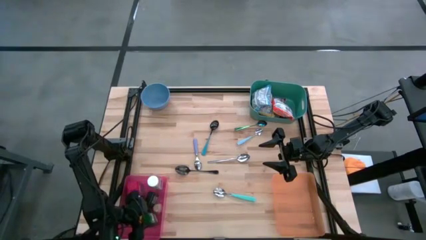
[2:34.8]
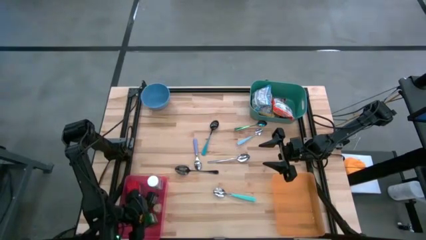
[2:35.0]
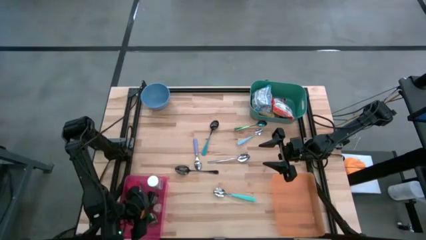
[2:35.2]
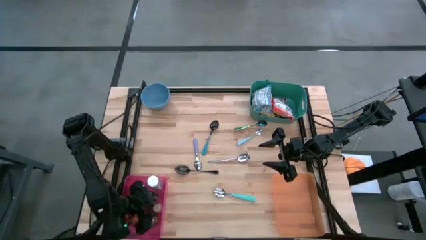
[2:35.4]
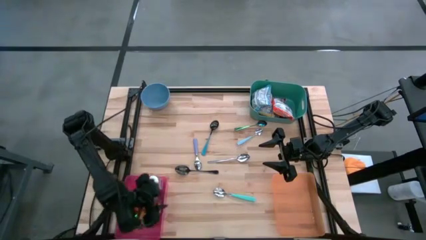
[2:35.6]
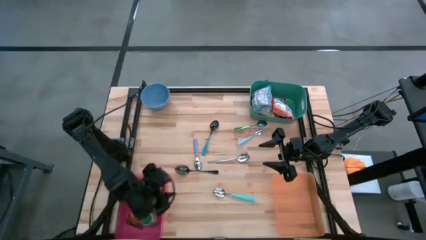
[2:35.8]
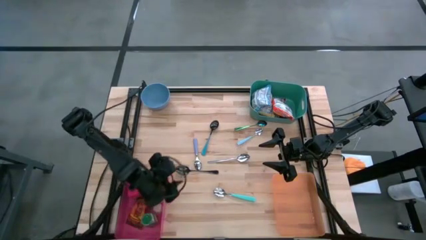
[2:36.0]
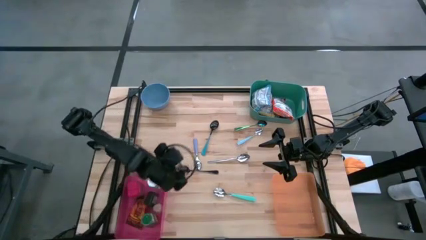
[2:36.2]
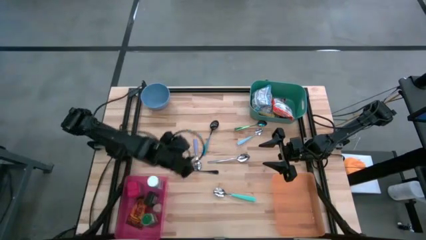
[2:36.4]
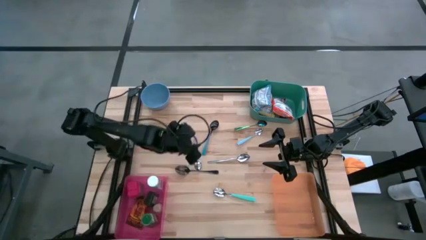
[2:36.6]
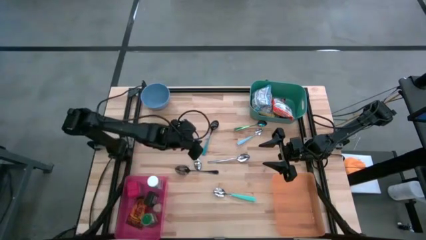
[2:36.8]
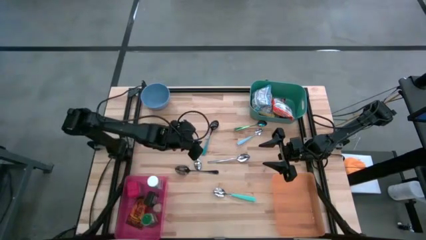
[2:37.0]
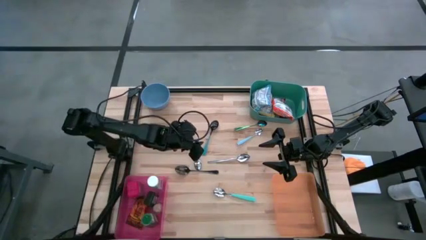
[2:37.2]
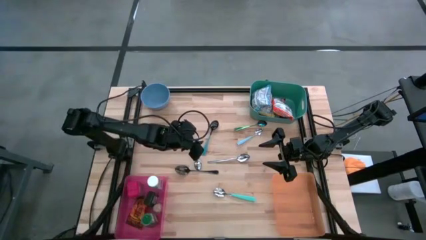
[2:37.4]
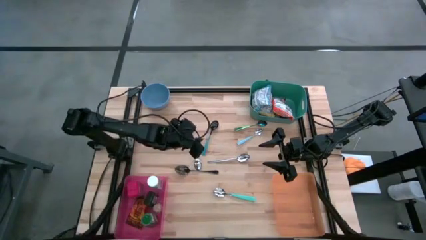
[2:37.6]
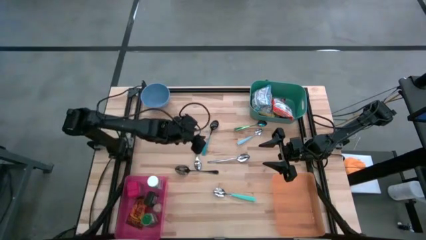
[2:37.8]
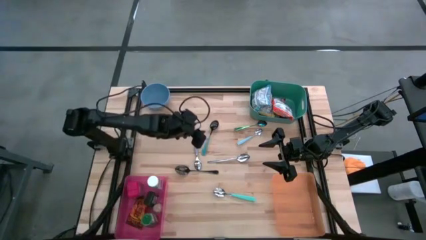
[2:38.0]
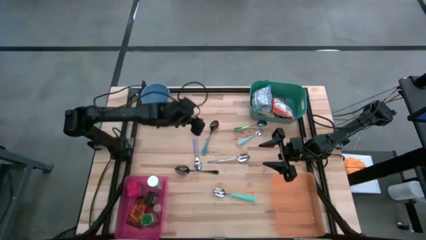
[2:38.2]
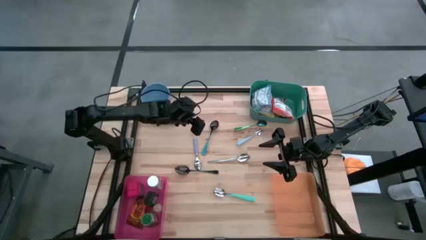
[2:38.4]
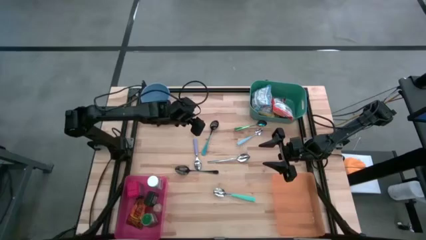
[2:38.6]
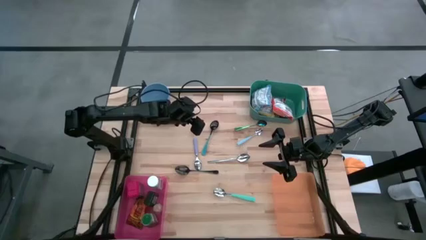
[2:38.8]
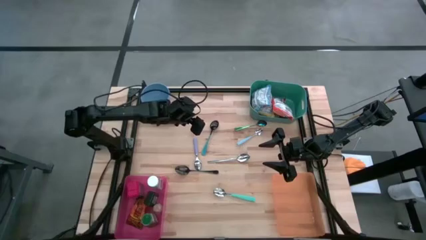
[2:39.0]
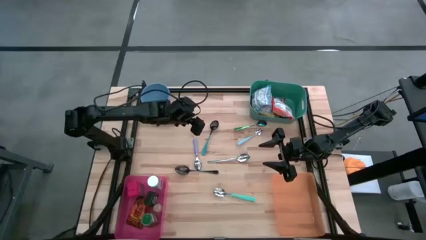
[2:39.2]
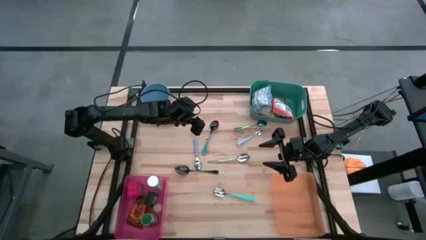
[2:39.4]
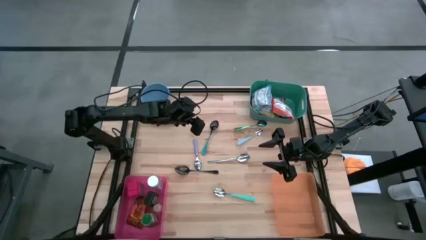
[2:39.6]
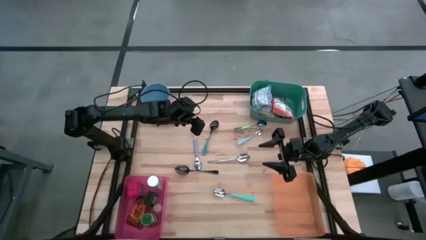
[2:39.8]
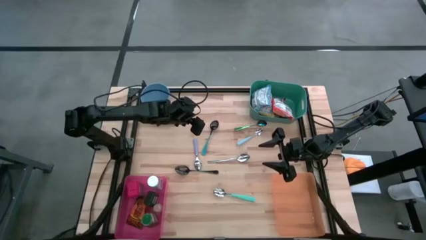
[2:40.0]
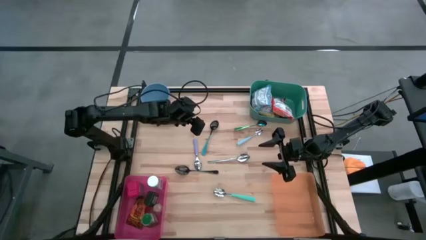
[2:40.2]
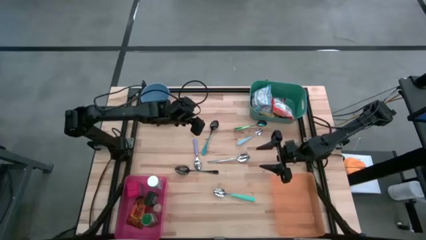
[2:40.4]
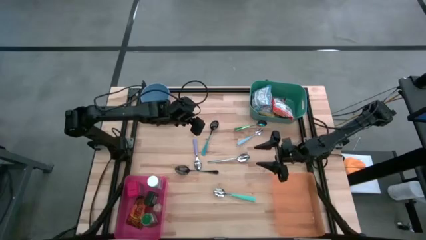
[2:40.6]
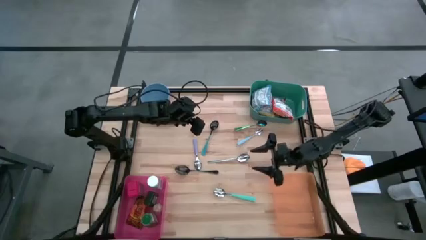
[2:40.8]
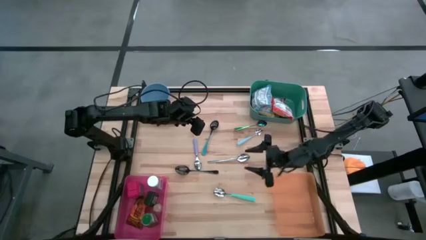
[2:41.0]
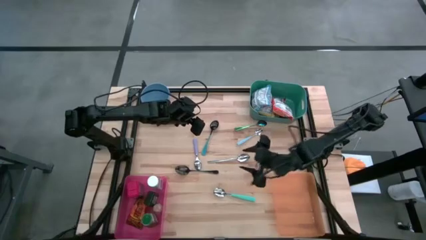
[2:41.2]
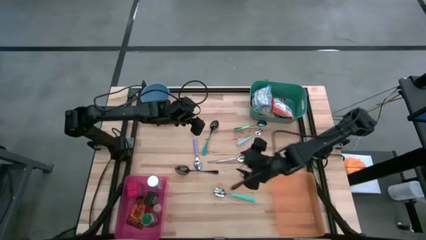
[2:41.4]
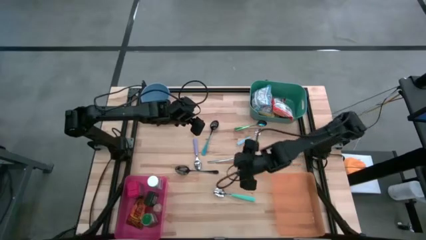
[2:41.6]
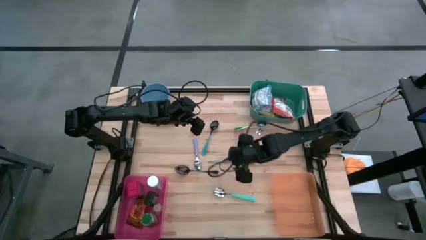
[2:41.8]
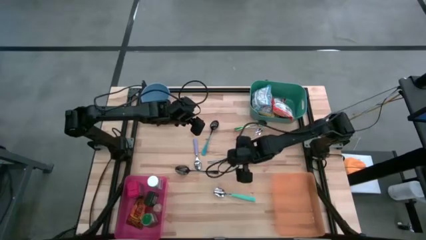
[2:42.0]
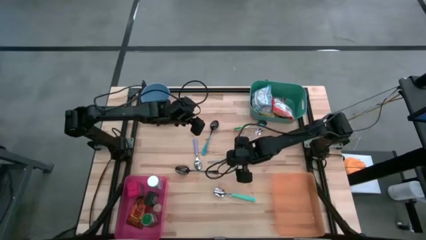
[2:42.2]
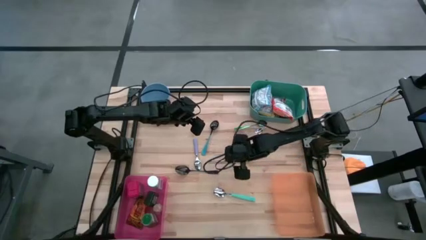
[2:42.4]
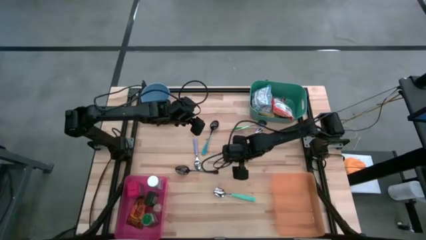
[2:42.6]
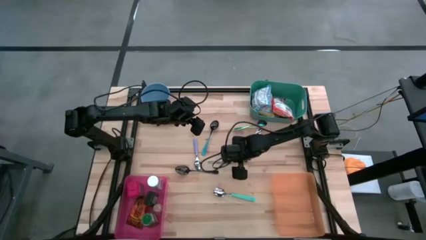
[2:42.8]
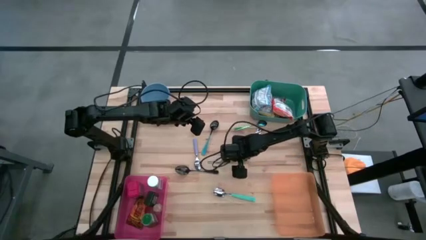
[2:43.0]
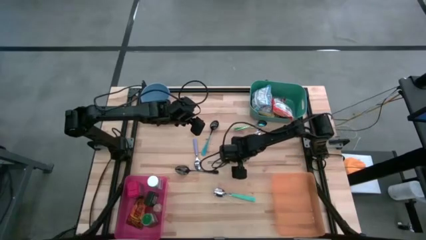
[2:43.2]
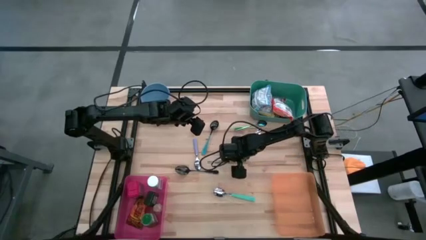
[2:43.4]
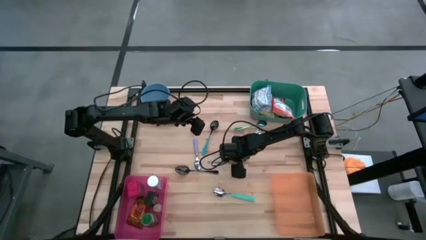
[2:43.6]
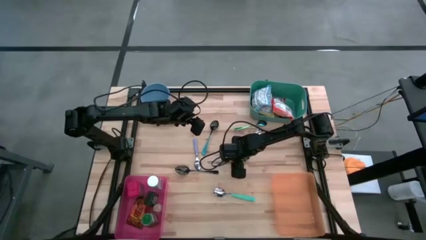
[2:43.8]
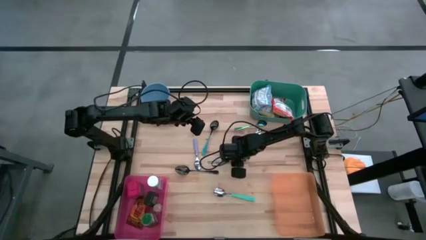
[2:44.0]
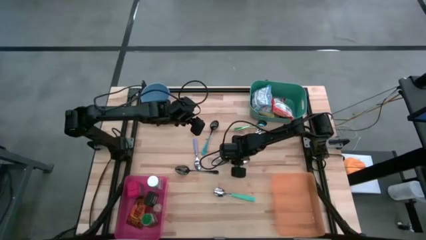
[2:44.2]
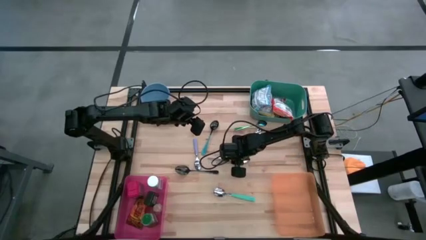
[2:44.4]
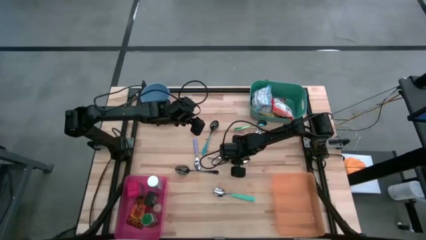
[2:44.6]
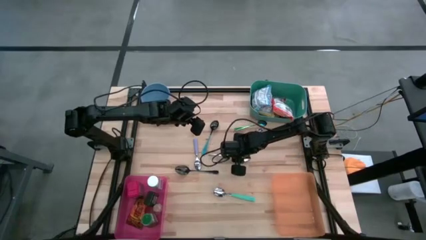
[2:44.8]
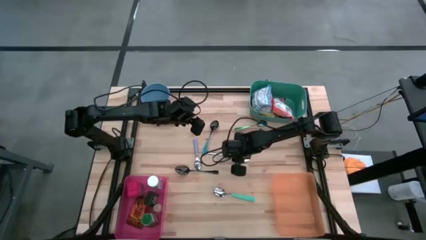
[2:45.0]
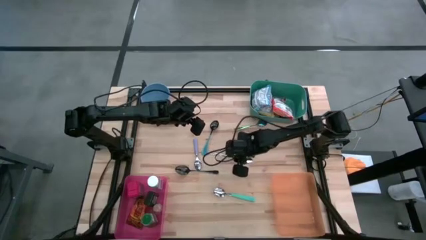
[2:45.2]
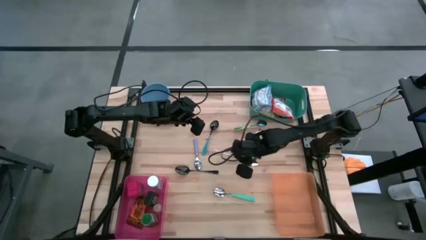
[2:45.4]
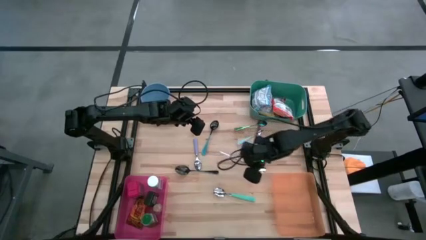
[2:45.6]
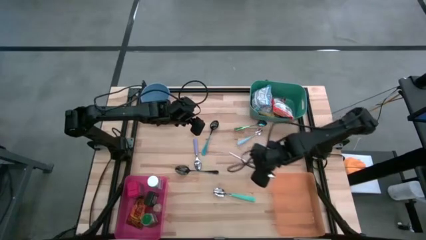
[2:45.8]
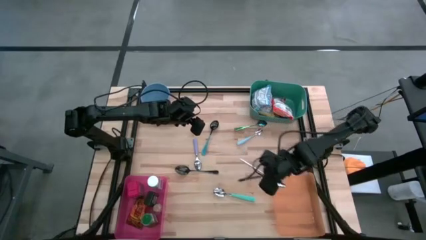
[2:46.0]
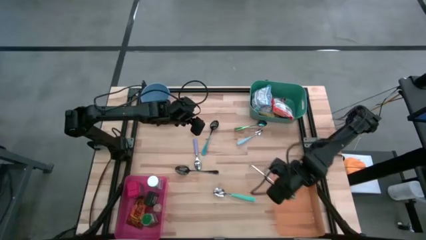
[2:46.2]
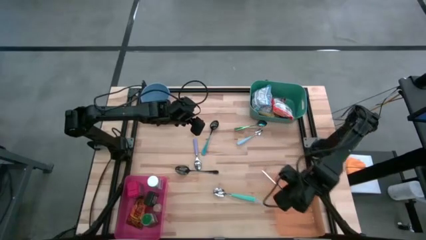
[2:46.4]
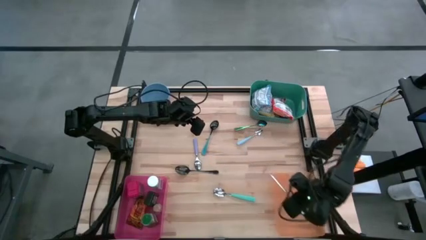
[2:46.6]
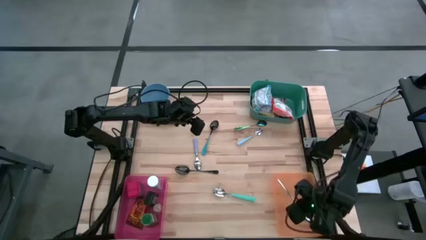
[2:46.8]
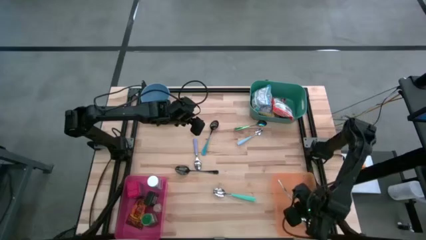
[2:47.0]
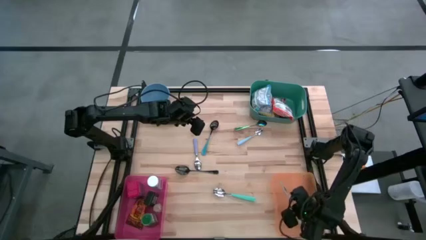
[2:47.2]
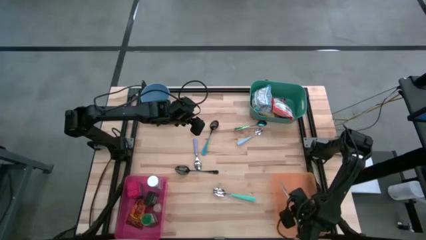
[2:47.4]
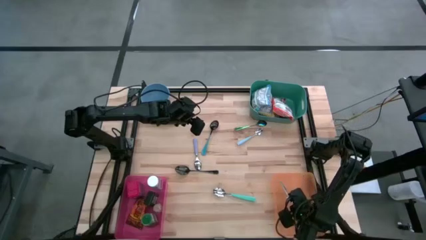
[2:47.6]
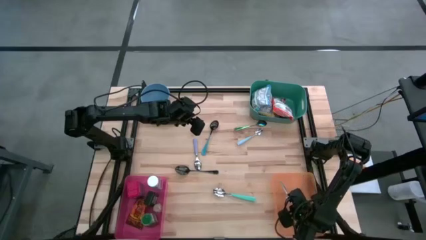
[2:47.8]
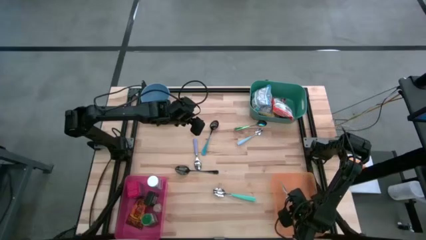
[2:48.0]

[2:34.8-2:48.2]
Put the silver spoon into the orange bin
